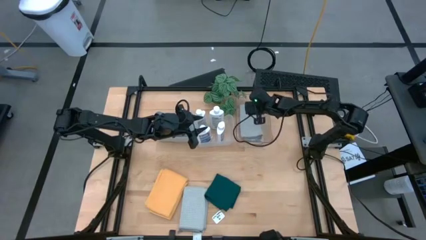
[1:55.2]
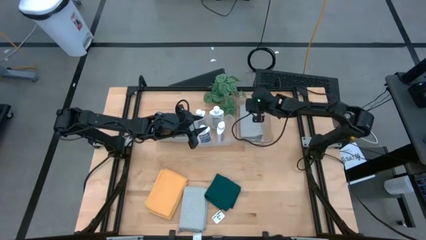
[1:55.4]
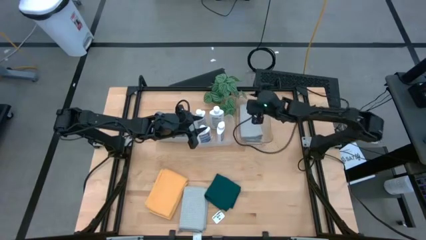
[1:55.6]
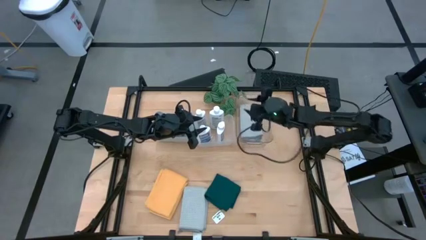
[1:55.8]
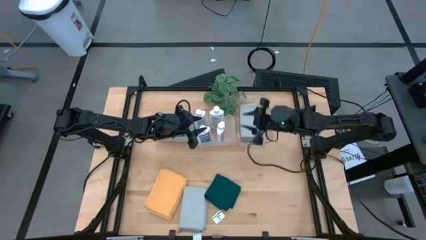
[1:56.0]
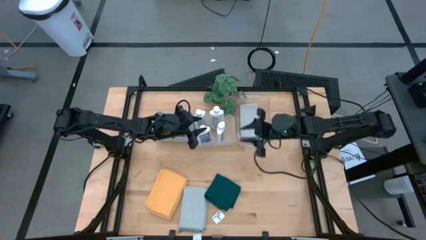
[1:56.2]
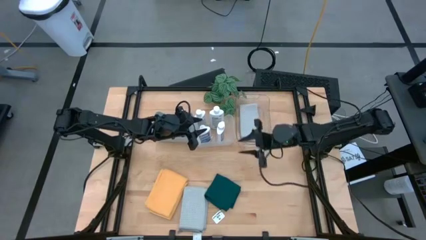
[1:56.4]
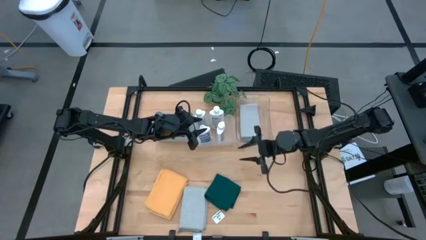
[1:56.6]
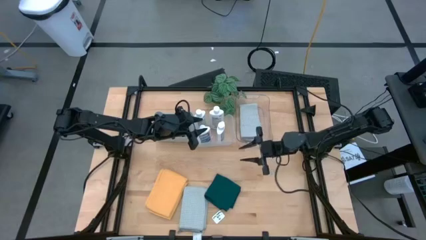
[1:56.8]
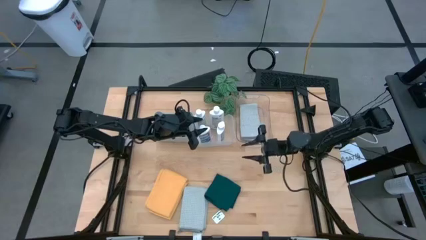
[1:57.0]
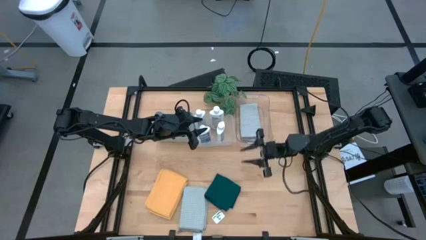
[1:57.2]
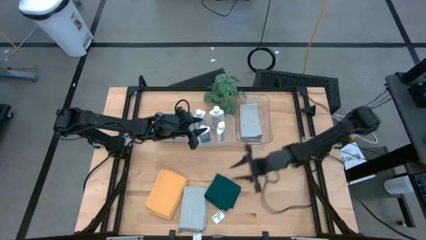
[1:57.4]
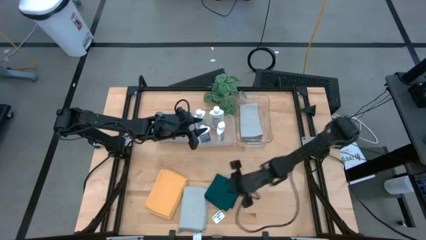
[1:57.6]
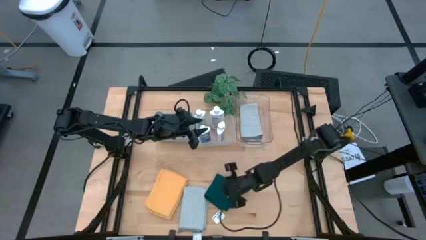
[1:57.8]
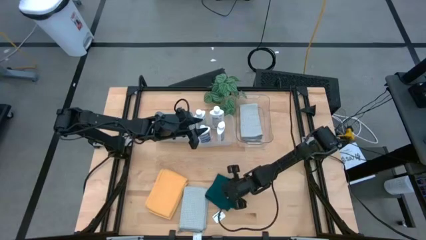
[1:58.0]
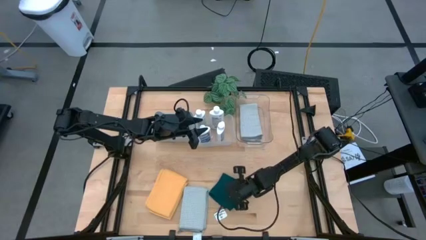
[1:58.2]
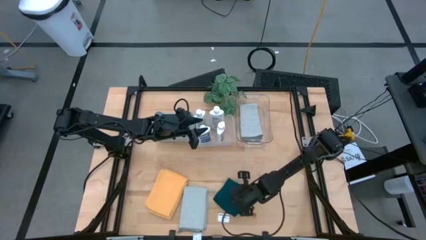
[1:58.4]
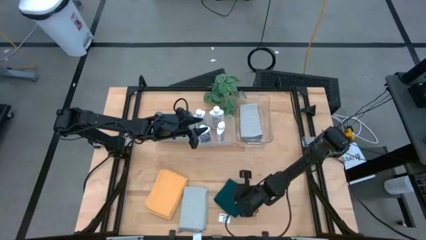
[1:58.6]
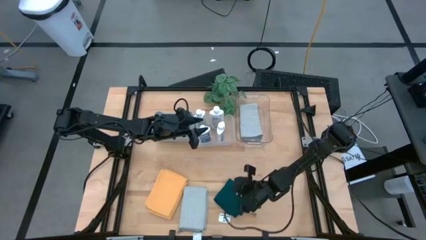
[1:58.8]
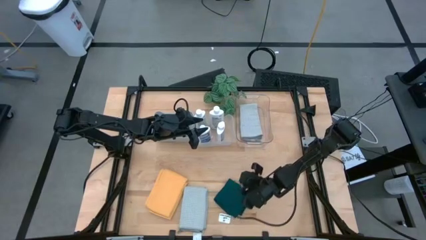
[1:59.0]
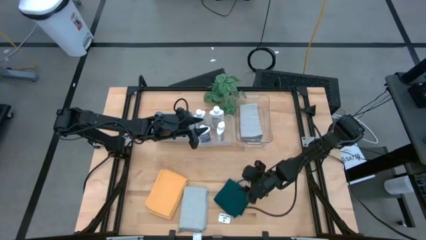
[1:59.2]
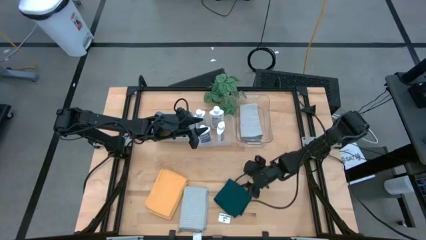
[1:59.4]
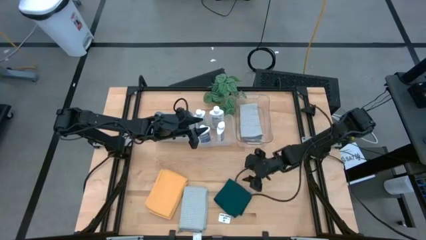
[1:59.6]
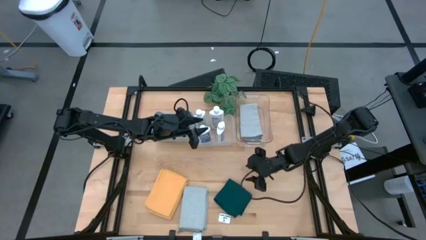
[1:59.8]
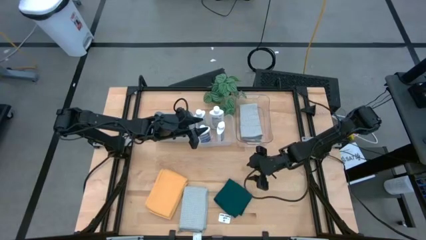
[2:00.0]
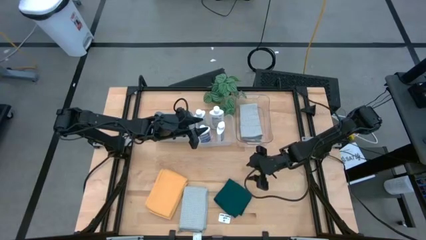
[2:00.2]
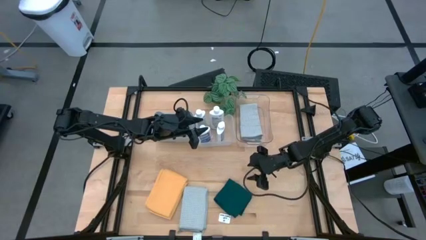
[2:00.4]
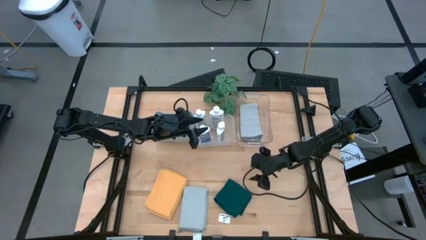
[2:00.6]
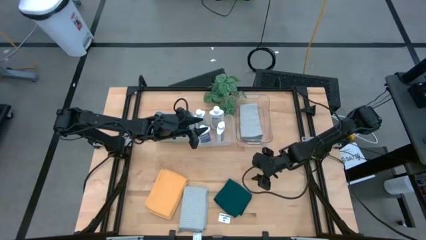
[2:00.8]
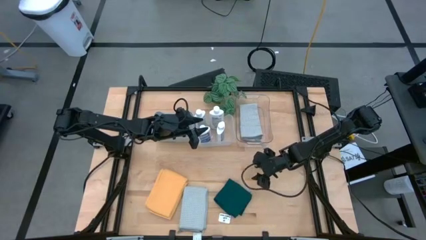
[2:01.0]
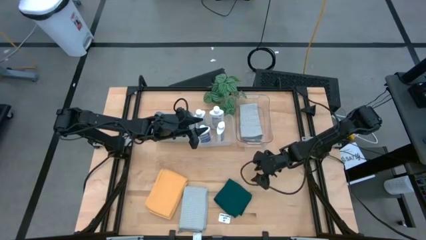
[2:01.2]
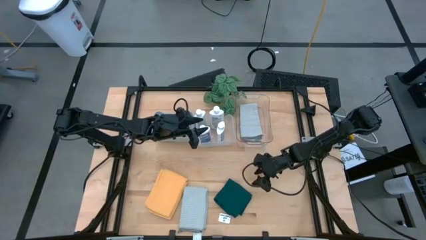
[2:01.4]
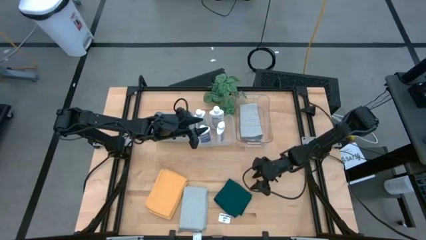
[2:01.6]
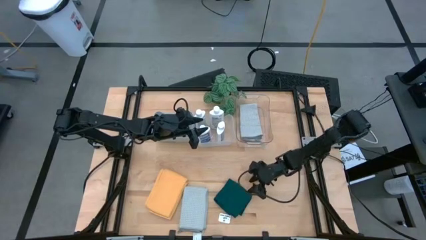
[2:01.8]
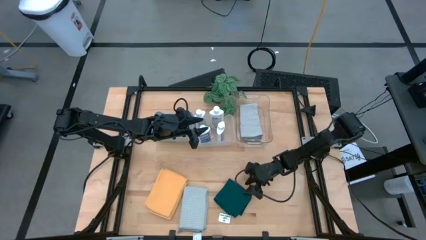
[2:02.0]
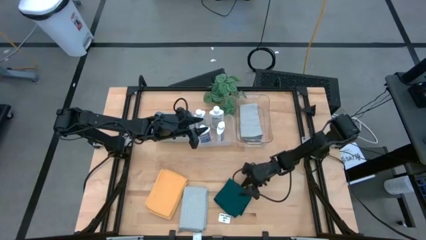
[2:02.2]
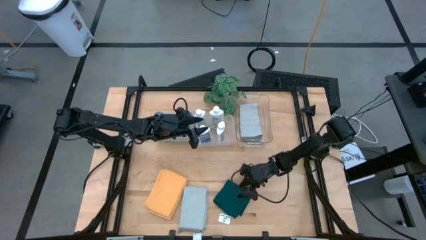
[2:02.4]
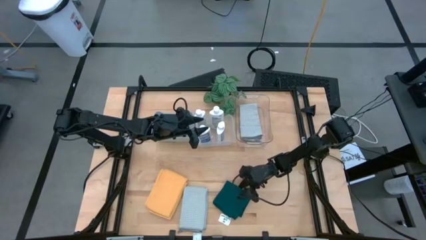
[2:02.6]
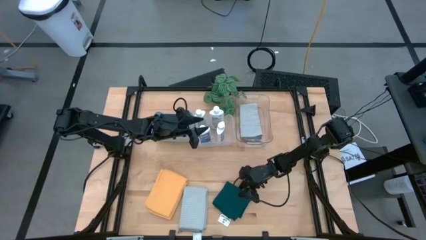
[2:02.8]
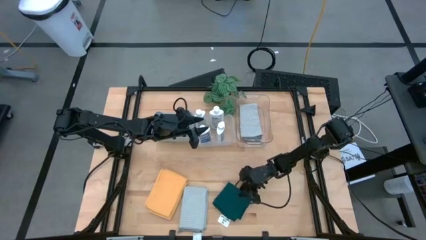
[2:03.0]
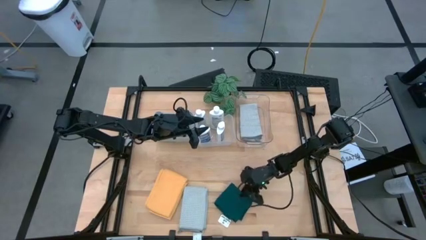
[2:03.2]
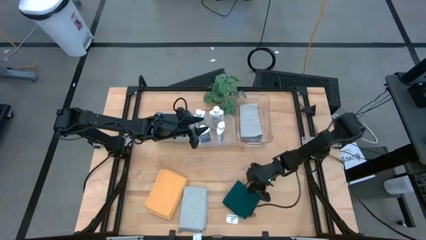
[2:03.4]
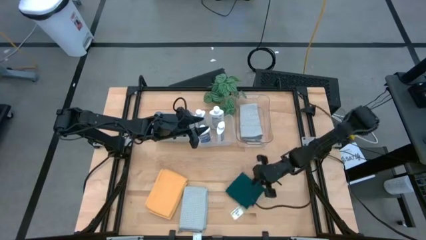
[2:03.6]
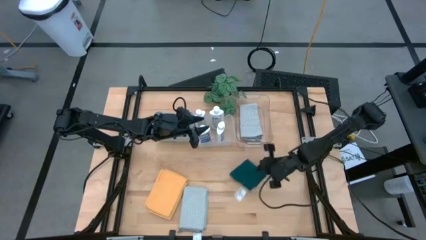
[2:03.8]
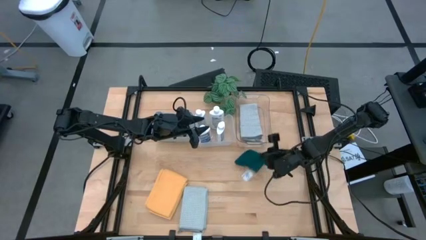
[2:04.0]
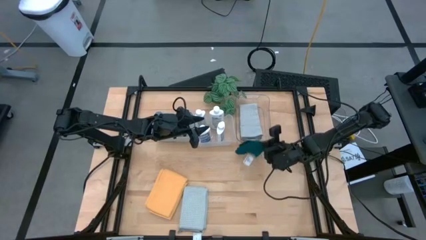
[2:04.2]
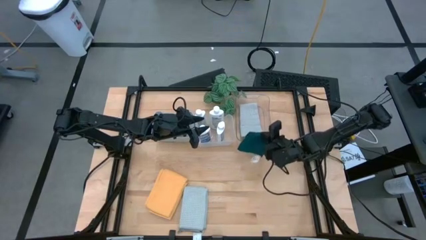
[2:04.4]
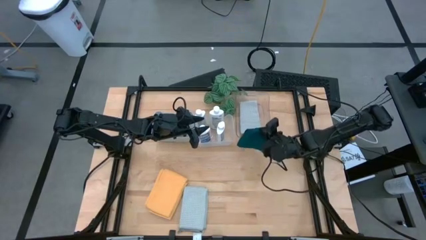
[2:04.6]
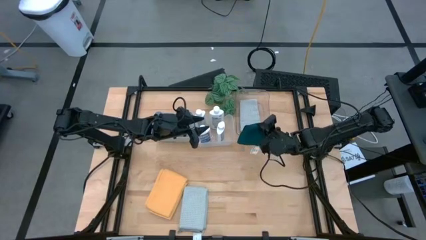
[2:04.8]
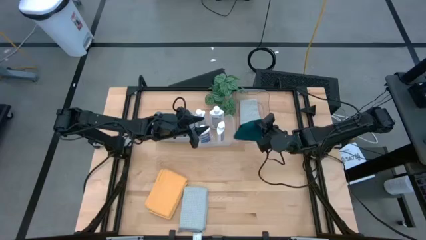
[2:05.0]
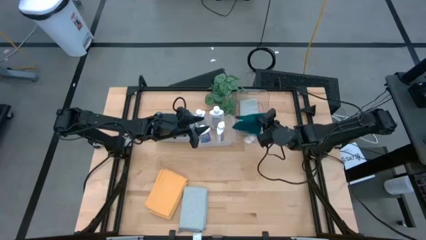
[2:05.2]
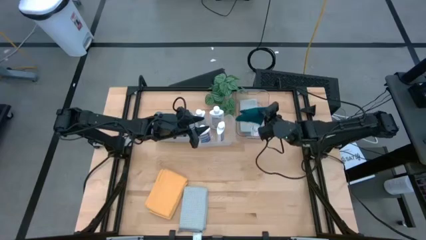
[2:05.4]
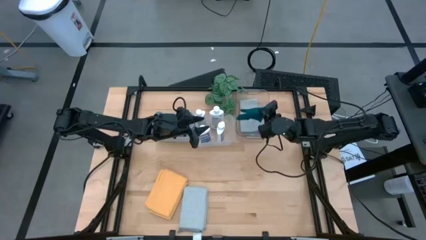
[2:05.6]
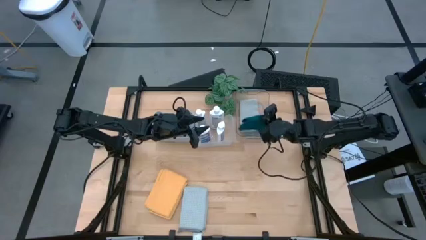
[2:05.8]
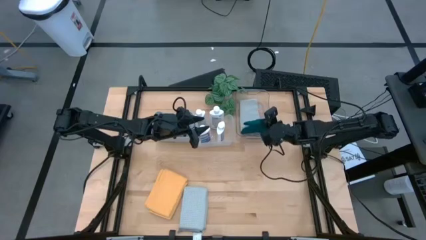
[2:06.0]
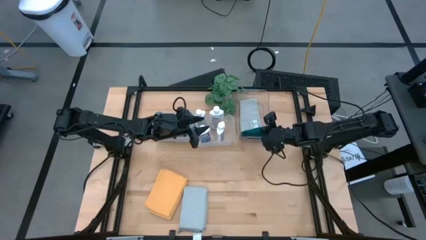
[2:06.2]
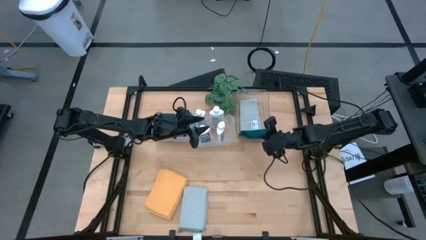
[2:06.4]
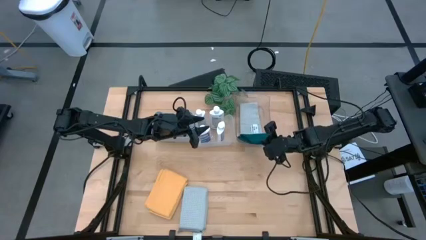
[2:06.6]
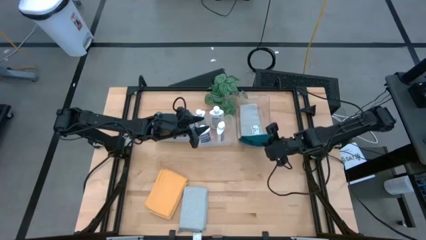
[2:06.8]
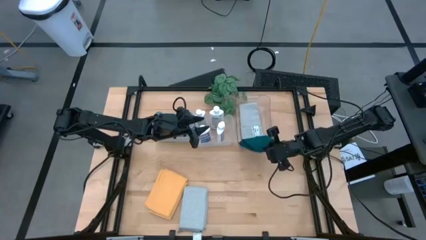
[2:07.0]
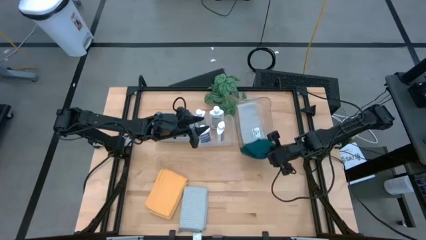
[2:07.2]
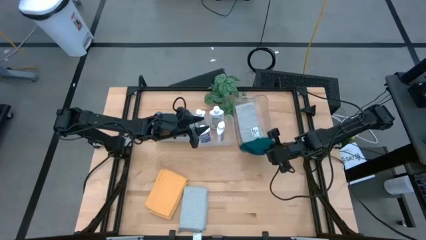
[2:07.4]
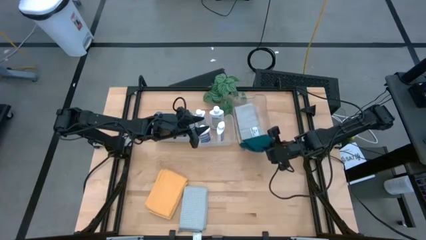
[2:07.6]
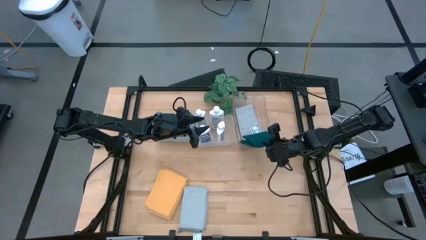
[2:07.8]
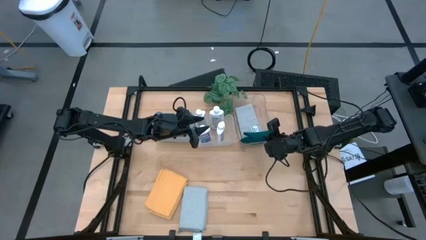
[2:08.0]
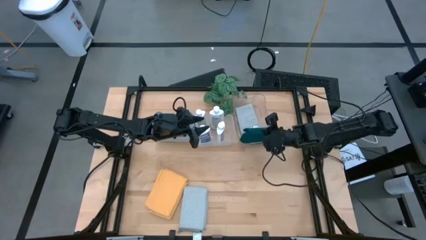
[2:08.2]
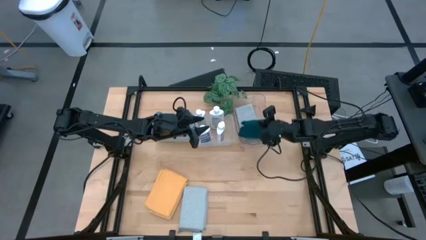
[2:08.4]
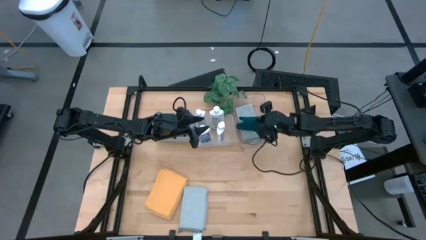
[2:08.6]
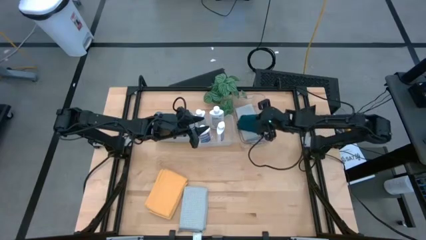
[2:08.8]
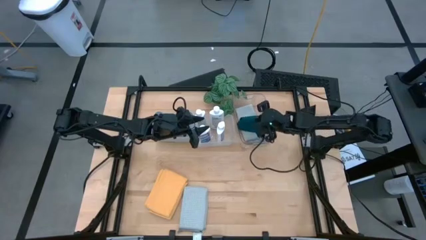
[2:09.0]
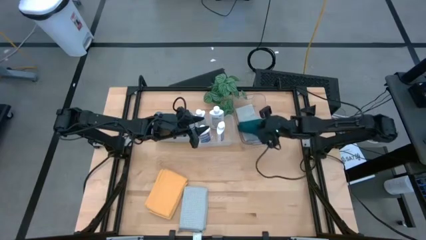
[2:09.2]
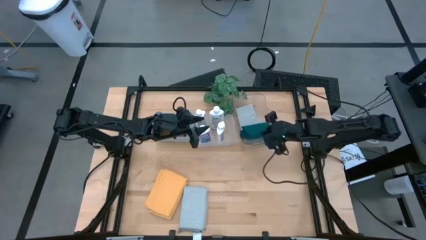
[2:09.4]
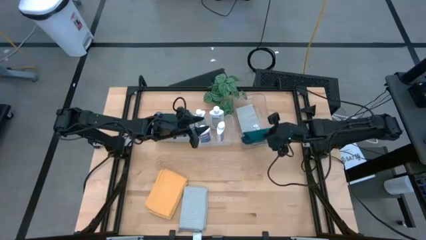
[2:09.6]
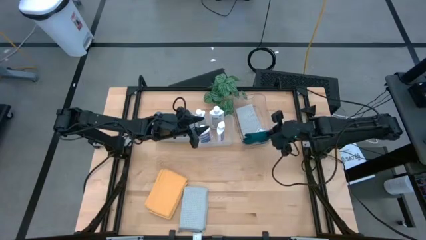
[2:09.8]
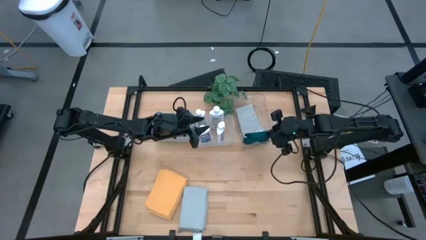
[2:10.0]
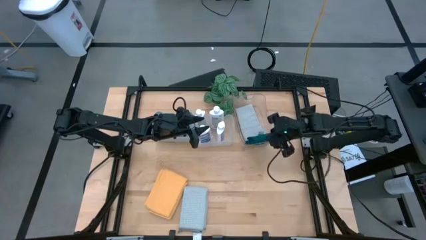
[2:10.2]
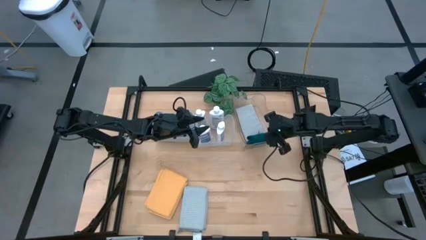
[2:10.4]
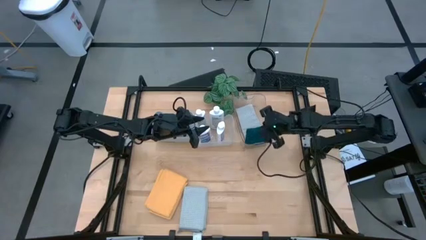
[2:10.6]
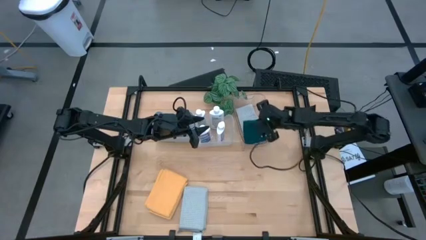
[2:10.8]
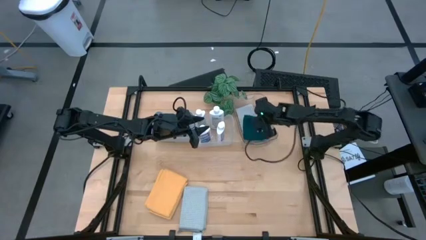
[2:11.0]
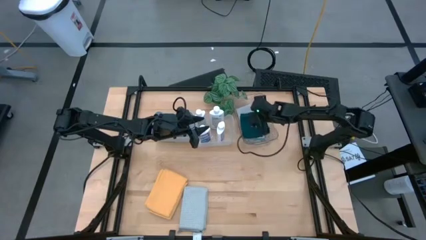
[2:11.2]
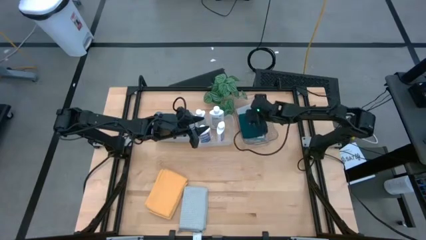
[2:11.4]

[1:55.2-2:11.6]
Task: Pick & Place Kitchen Items
Put the green towel into the transparent bin
